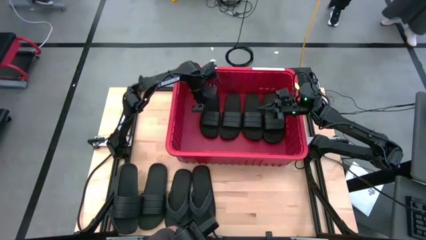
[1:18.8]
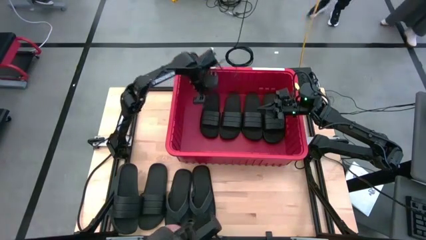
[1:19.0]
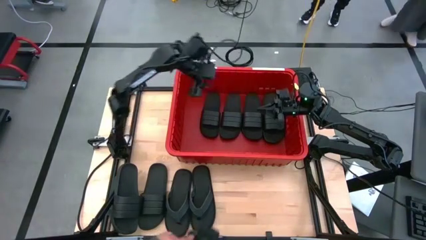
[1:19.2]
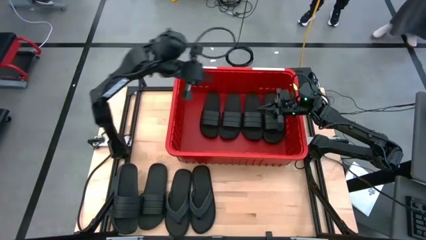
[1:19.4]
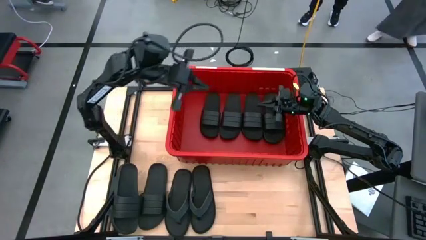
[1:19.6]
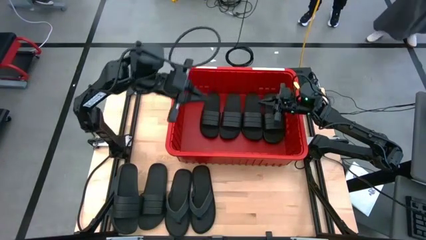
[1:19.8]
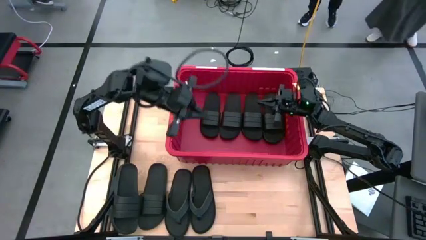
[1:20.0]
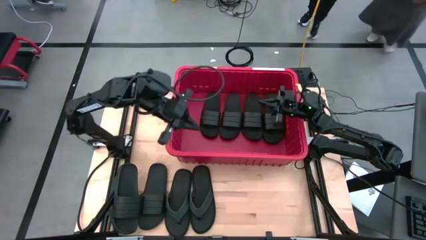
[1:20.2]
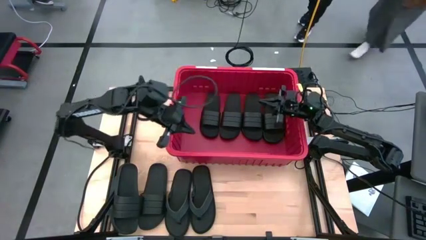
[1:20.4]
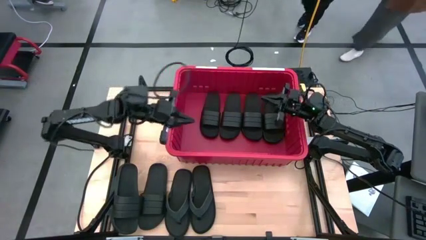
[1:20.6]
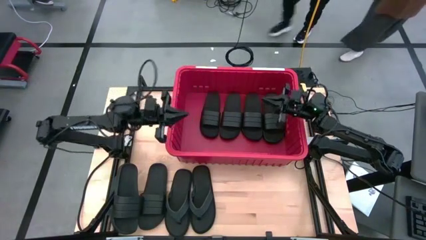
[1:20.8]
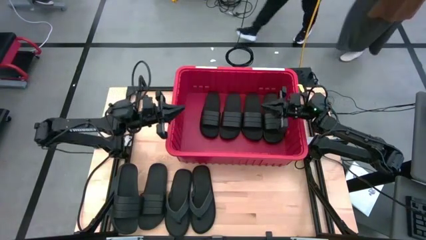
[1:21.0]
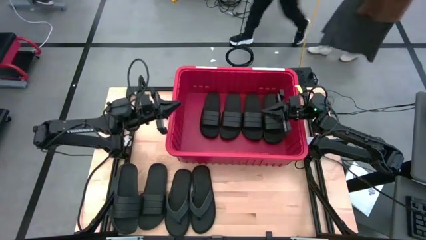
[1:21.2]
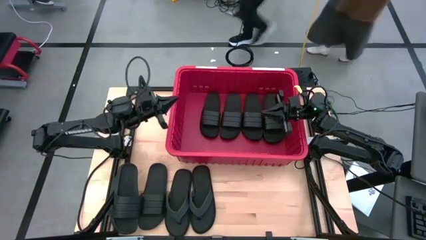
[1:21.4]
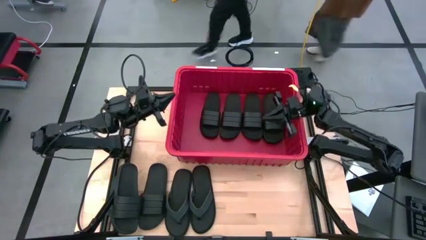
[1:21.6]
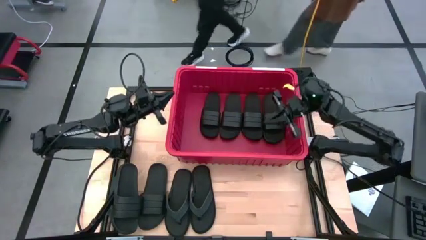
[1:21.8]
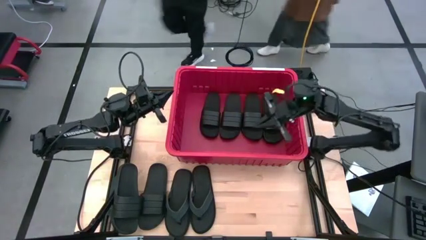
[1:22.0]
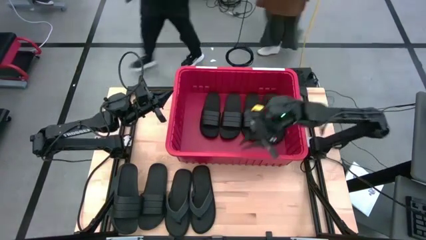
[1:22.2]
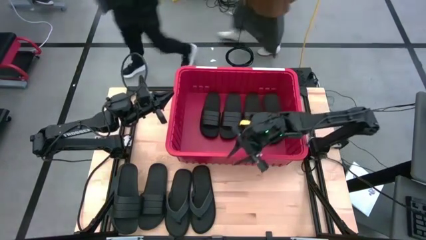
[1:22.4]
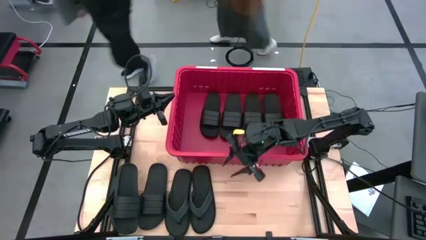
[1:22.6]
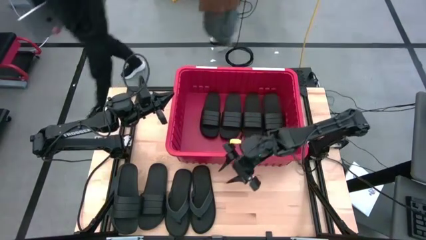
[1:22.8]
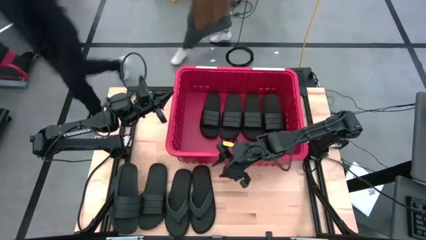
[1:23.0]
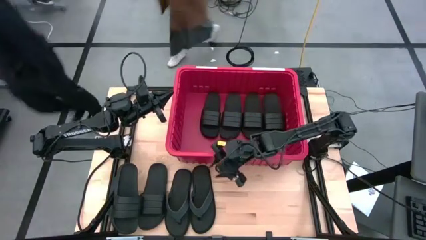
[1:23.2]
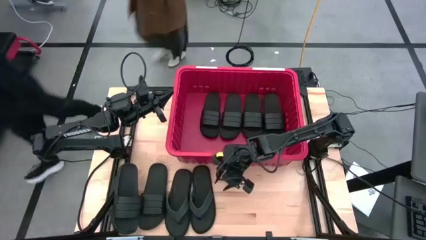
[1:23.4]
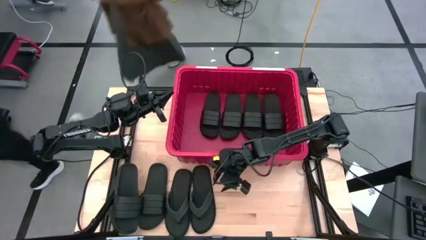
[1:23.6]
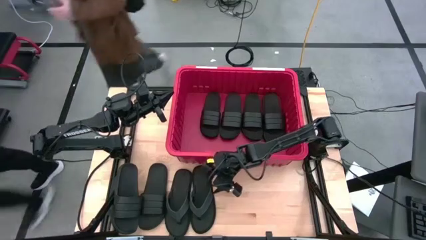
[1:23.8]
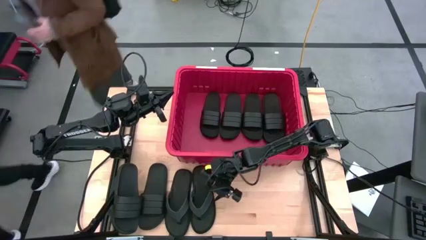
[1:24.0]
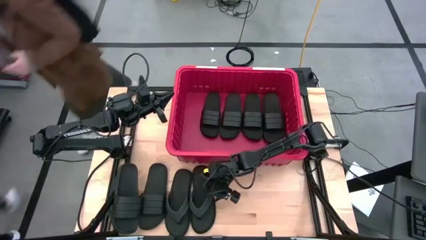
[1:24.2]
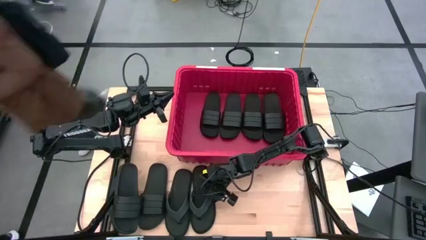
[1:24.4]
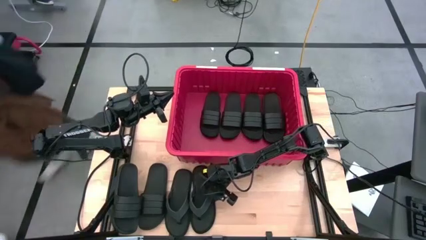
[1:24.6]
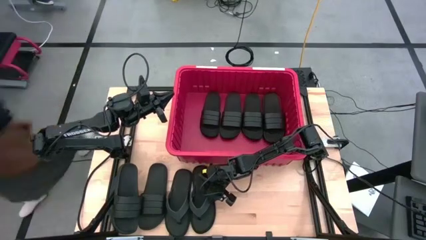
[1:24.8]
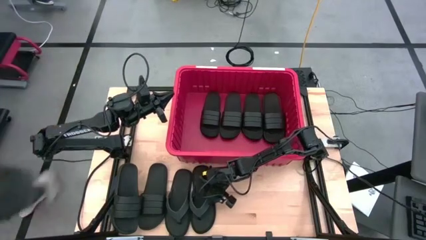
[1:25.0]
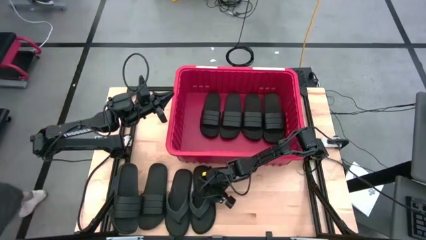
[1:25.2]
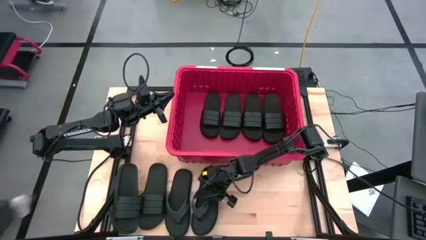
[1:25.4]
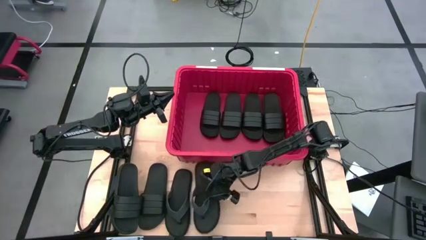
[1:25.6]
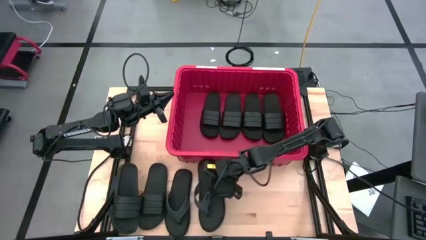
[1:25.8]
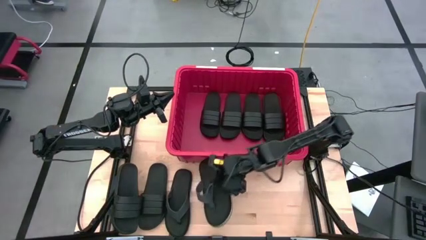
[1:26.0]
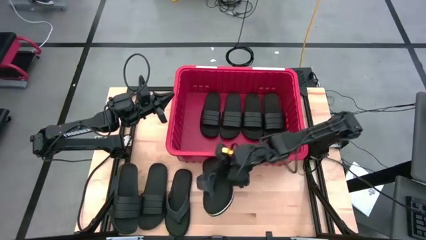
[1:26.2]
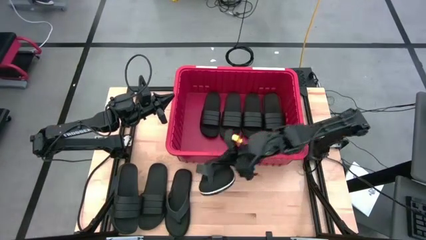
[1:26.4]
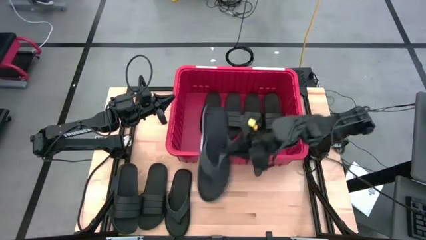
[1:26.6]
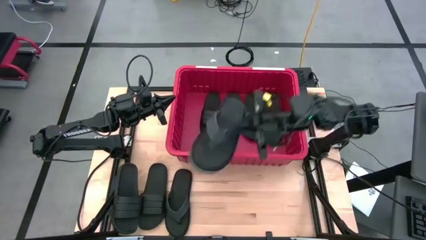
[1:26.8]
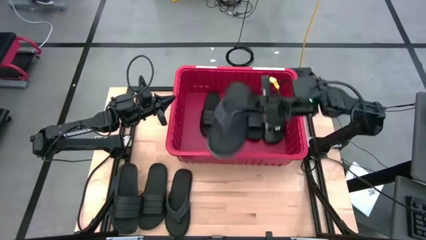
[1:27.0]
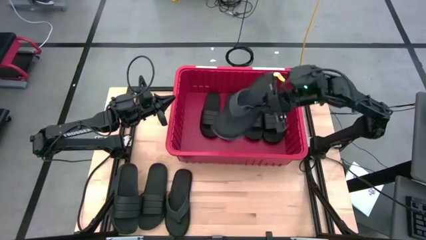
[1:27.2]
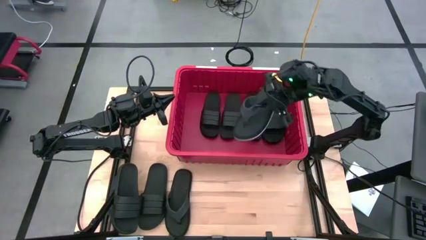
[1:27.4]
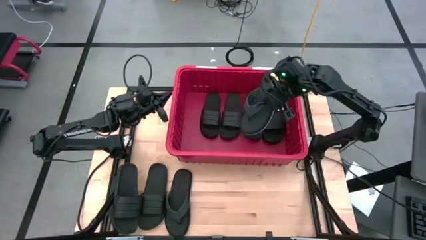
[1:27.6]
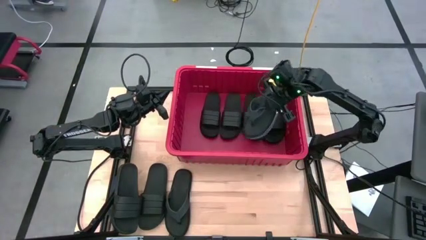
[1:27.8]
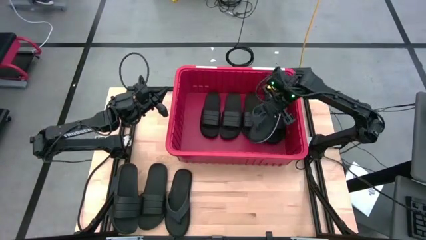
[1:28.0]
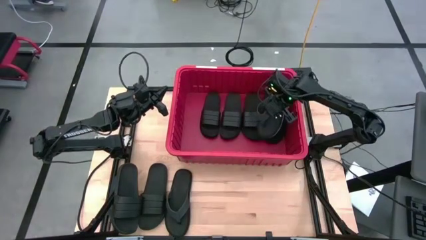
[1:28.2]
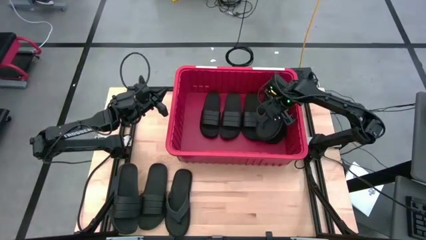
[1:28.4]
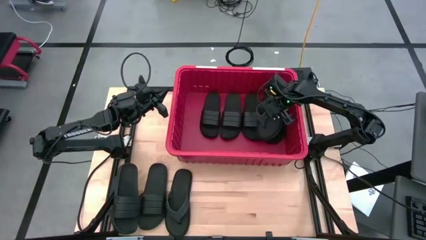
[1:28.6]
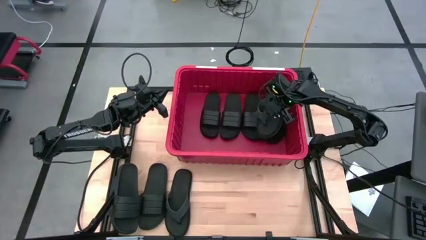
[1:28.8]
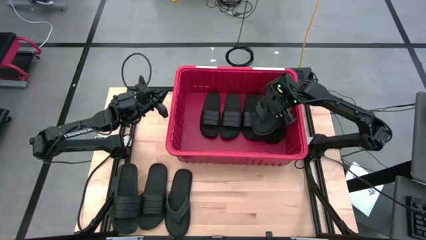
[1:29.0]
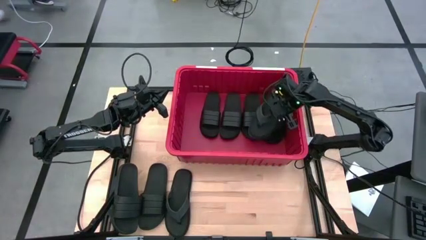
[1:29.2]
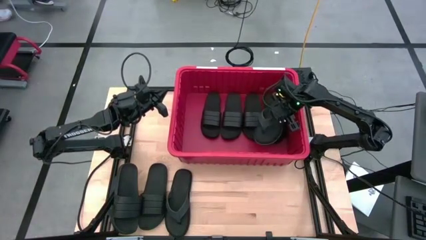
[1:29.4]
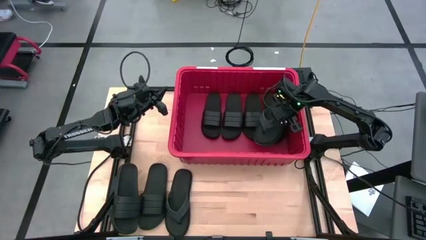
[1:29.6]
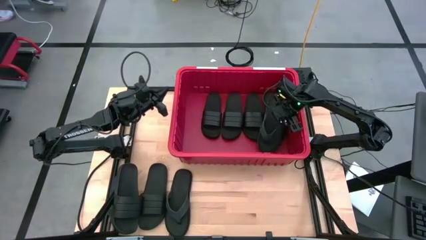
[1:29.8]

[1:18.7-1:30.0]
Task: Pick and place slides into bin
Put the right flip flop into the bin

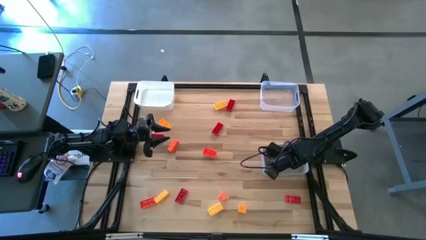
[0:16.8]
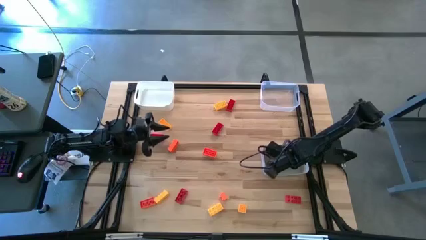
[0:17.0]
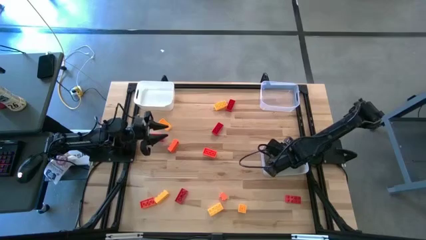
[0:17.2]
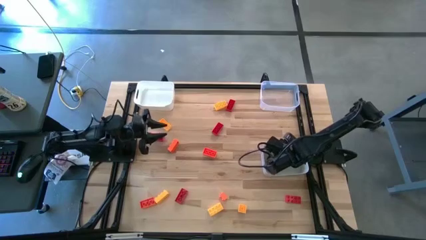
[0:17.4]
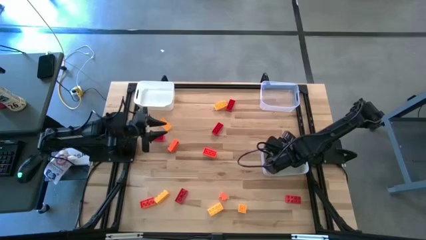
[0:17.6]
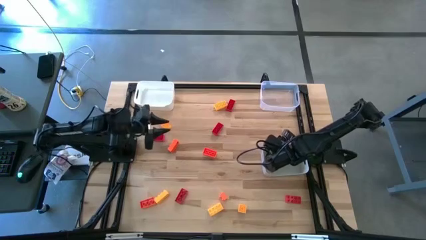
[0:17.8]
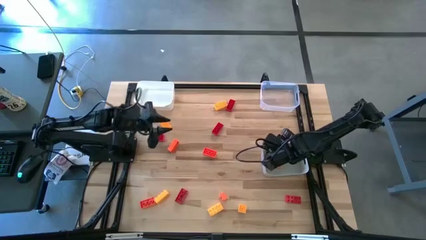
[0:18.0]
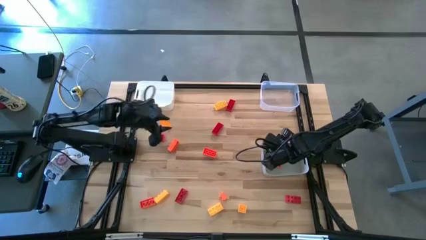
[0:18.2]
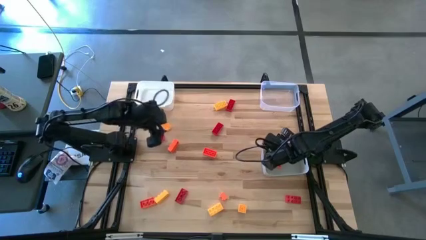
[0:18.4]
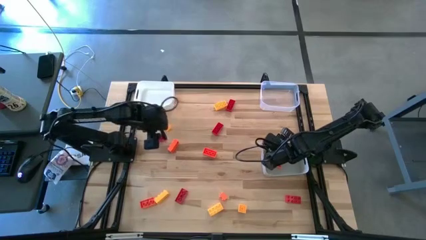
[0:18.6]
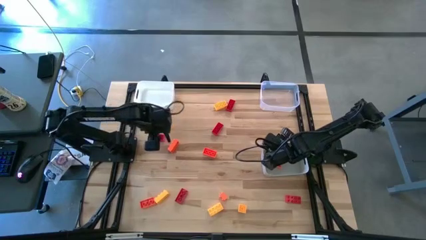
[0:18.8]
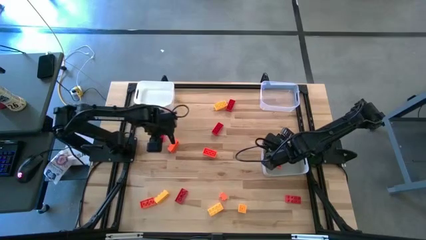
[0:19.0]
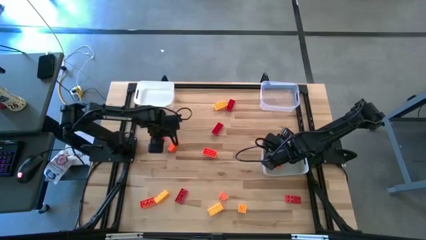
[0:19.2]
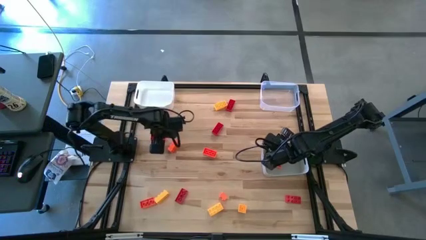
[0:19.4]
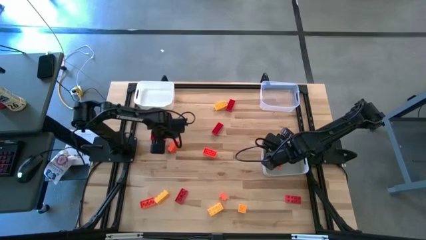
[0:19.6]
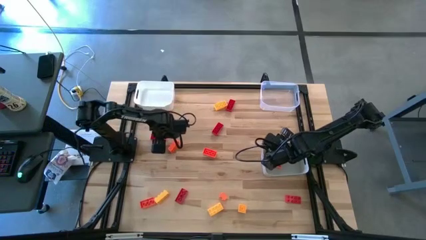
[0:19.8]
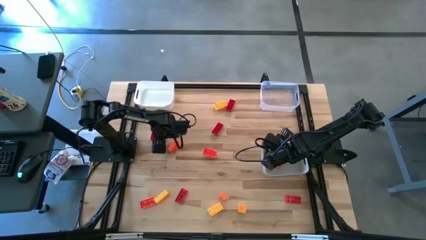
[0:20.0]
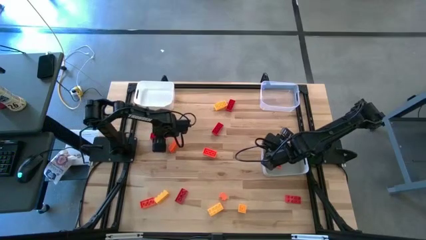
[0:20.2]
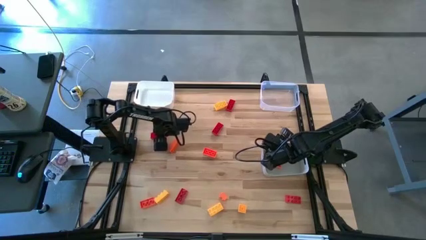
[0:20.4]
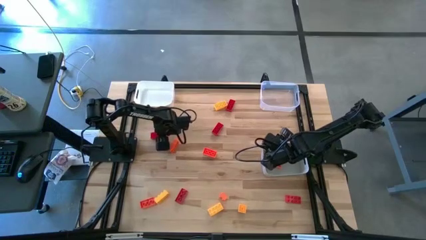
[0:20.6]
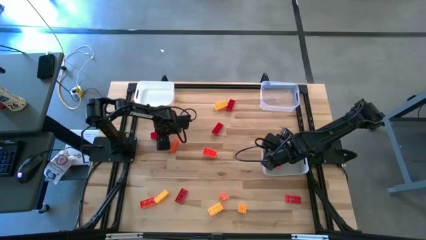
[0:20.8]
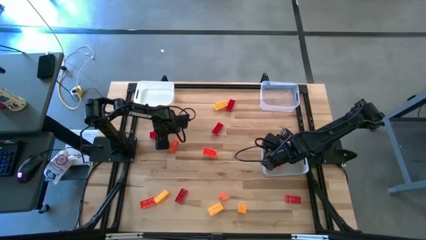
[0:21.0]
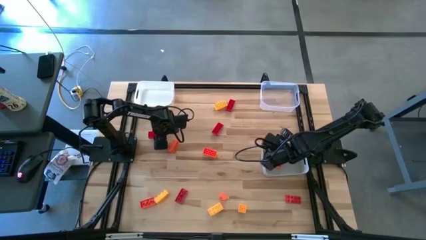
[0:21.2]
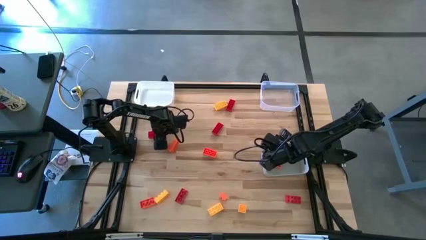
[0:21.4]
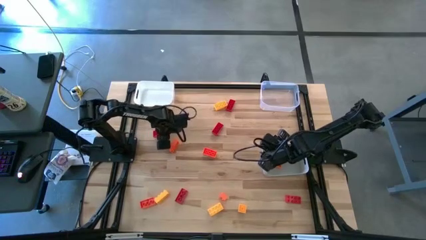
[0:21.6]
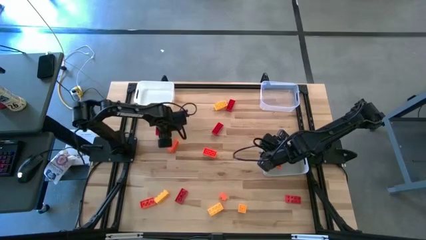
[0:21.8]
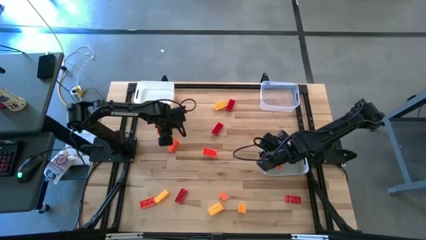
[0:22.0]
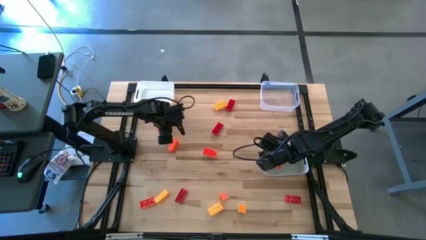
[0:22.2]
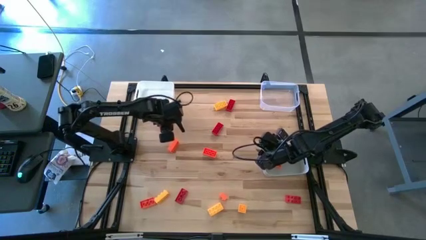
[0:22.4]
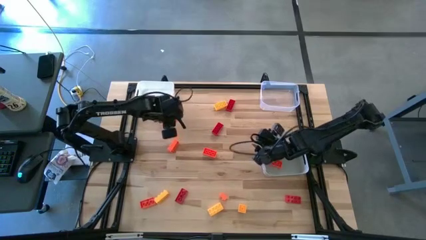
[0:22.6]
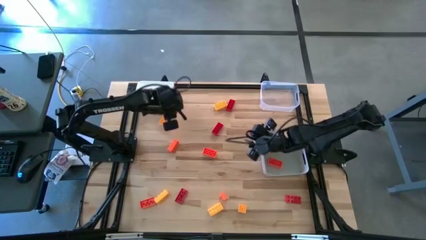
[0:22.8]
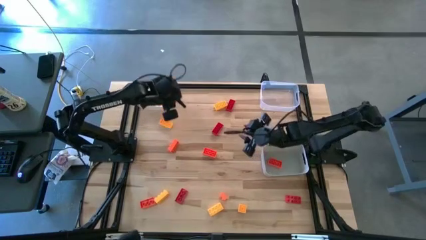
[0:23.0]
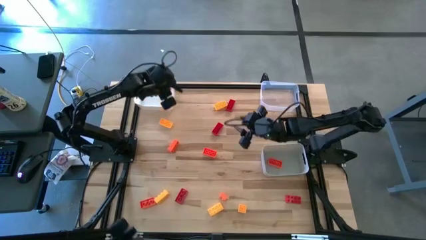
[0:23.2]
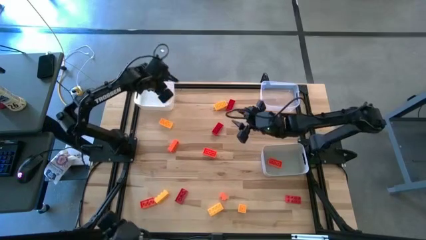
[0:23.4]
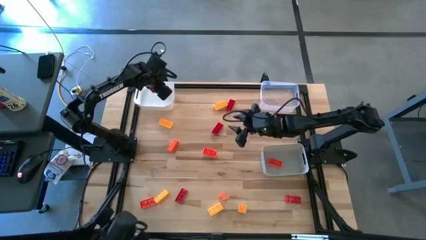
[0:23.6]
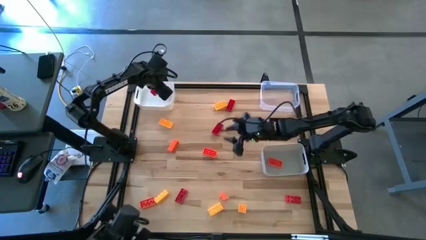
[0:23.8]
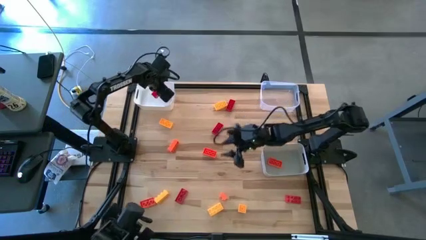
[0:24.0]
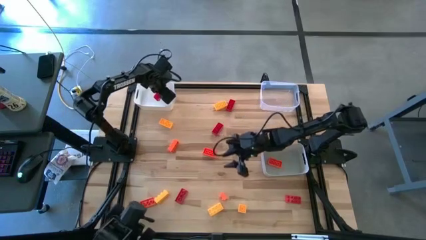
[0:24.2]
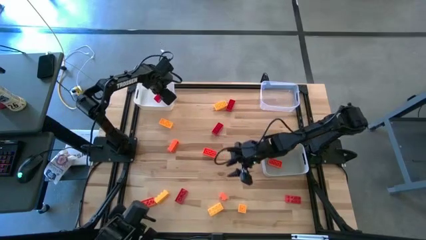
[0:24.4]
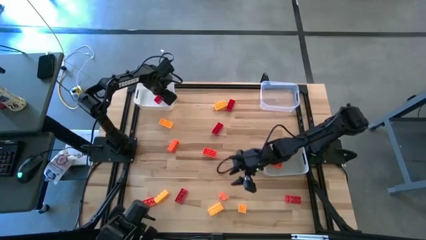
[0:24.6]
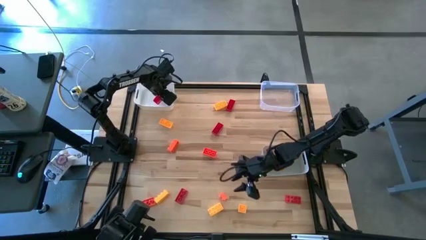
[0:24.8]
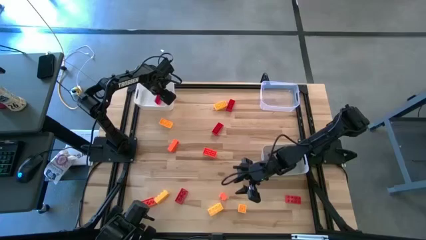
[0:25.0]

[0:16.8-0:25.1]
Task: Sort & place blocks by color
Put the red game piece into the white bin
